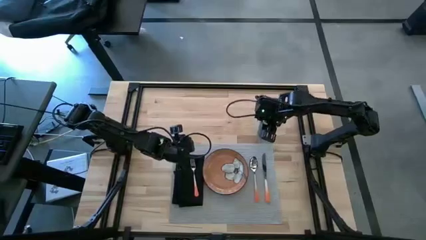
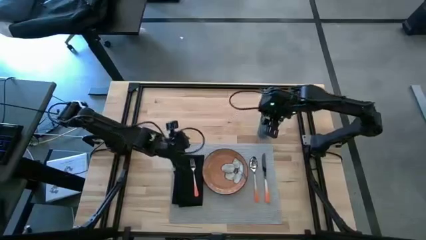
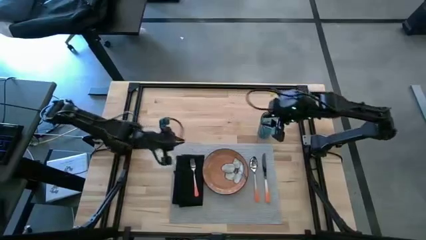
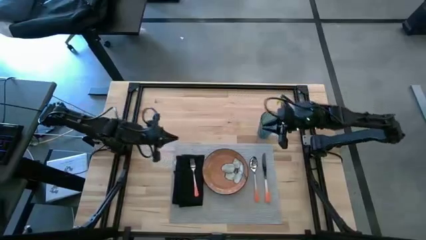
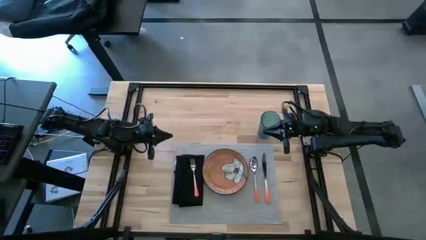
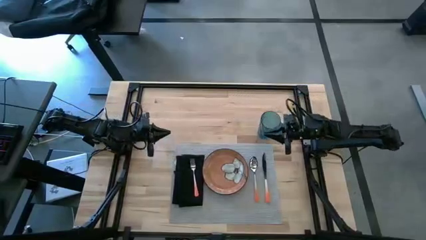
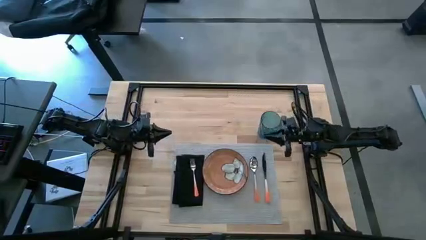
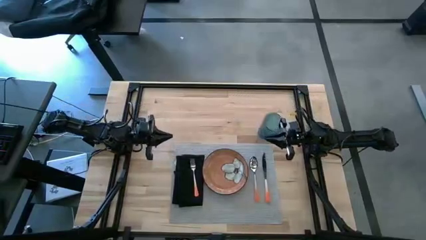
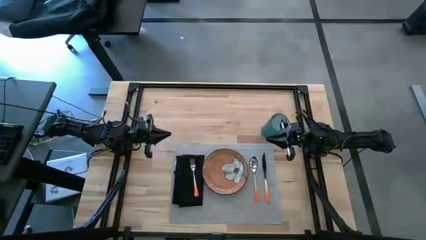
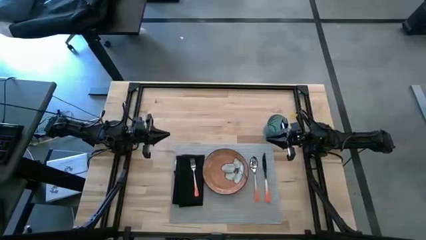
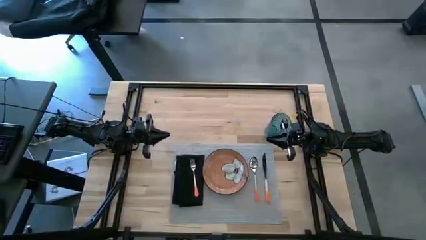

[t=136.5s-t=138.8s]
Task: Set table place
Return to Home Position

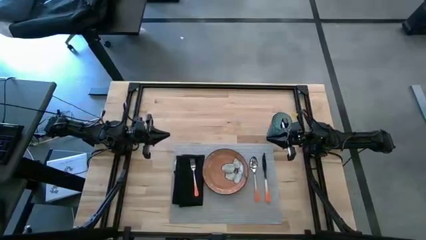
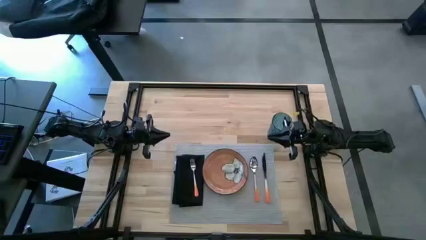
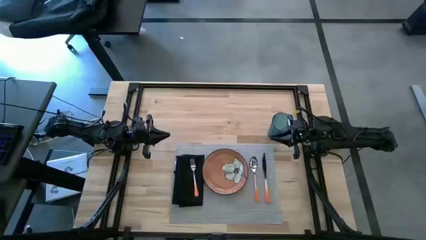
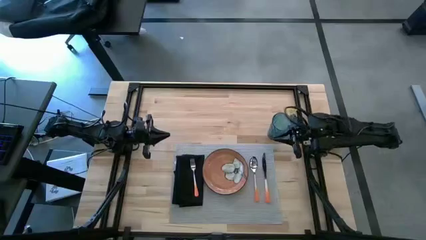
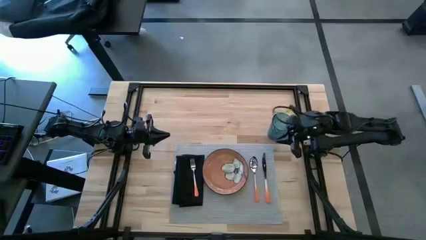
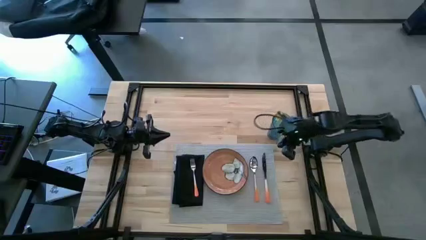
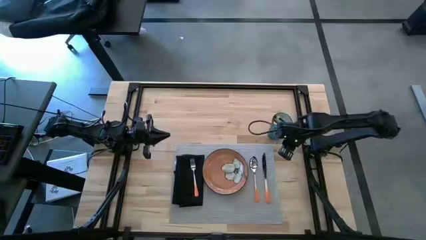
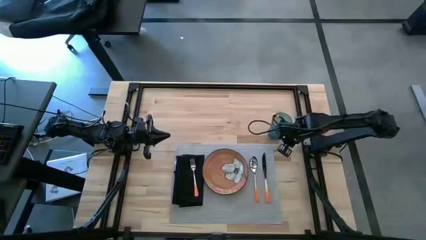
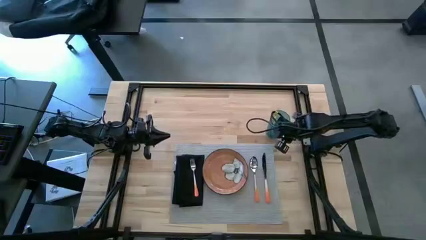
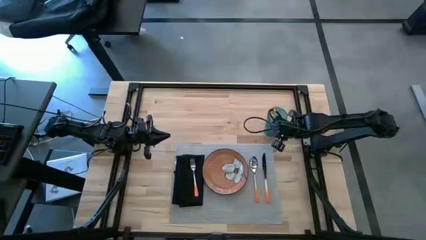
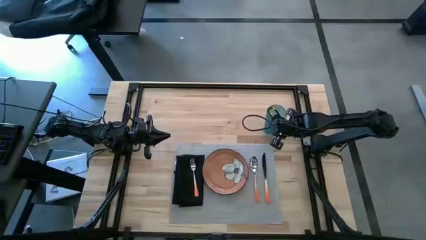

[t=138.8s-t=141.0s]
Adjust the blue cup

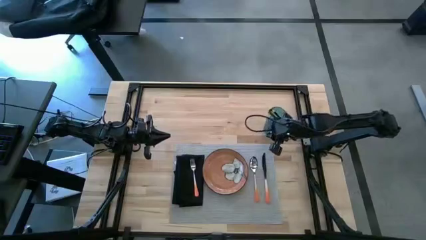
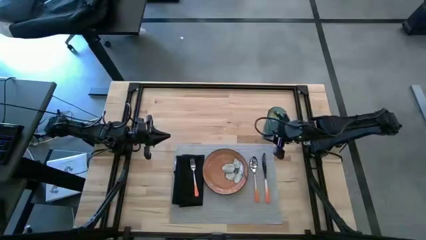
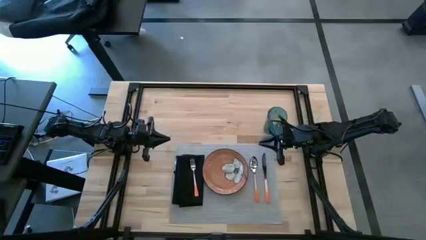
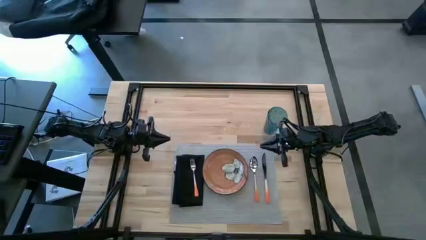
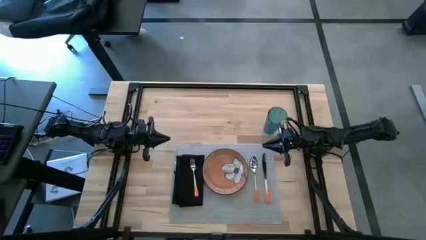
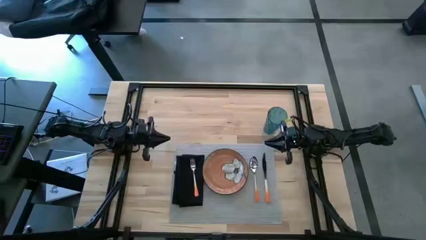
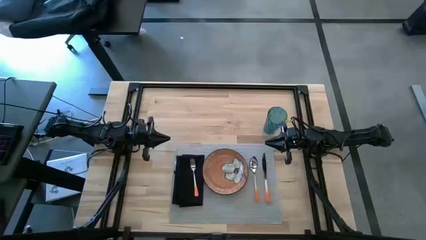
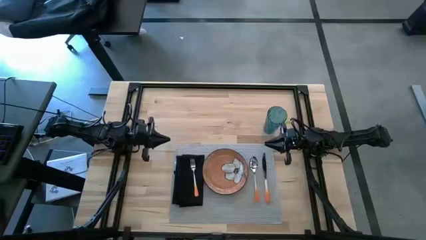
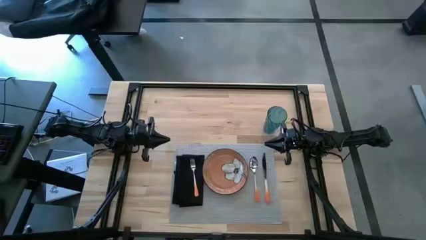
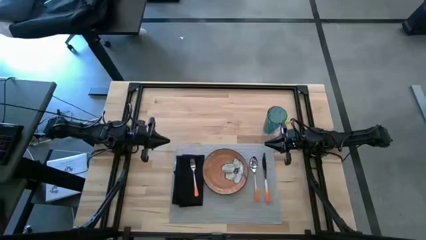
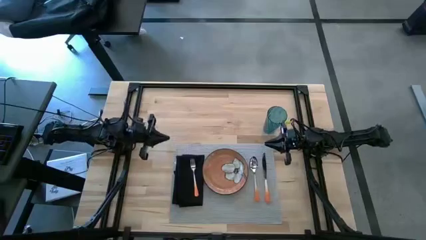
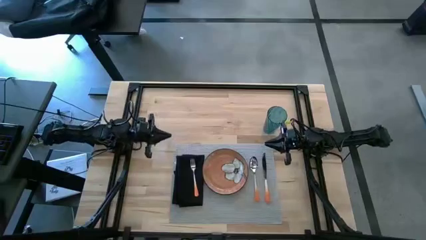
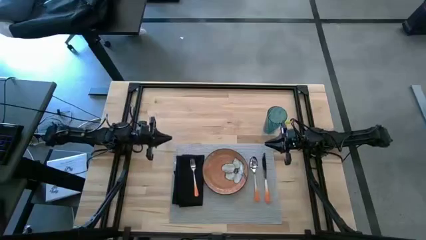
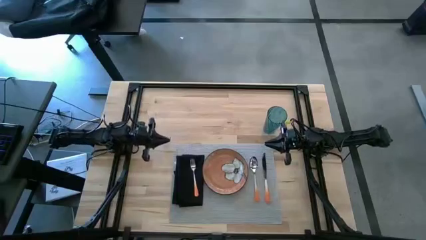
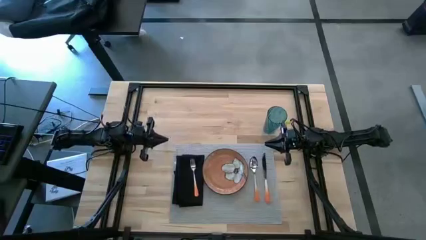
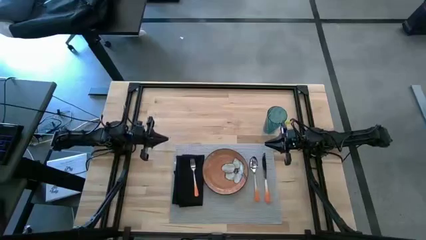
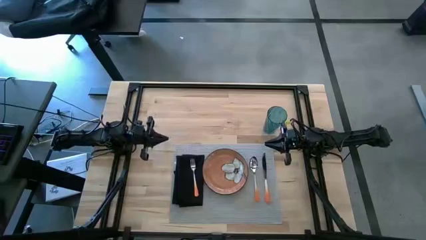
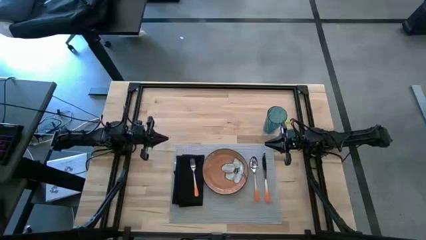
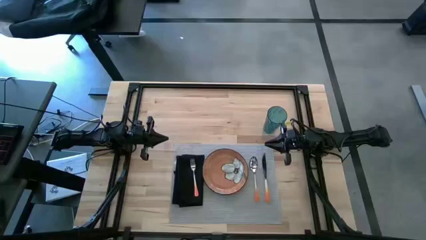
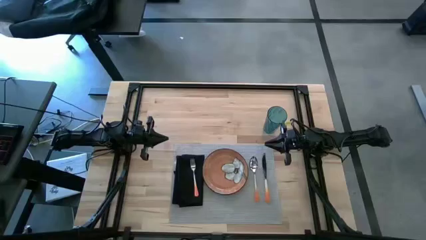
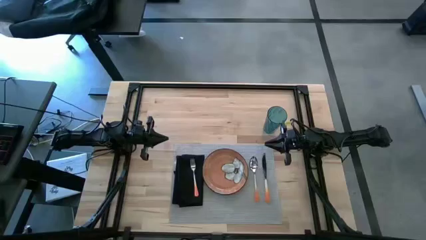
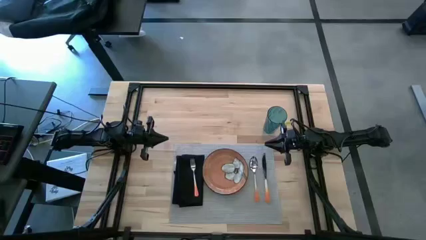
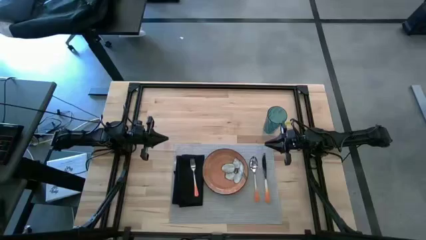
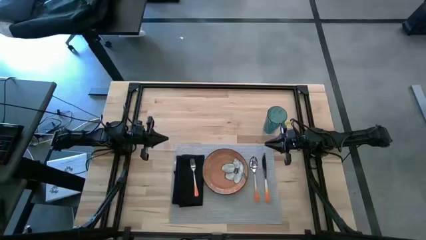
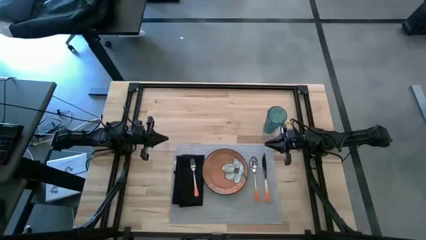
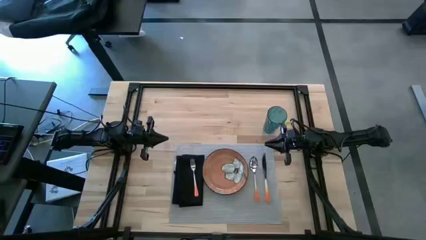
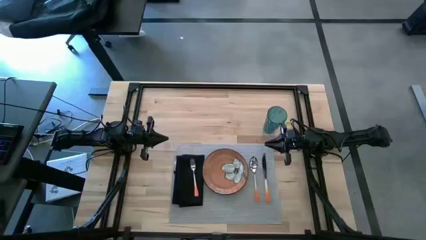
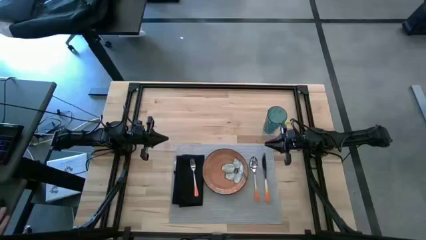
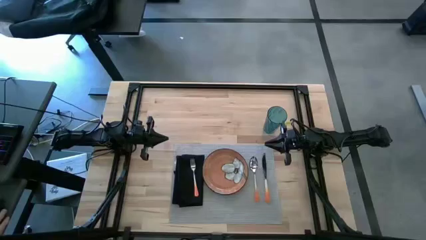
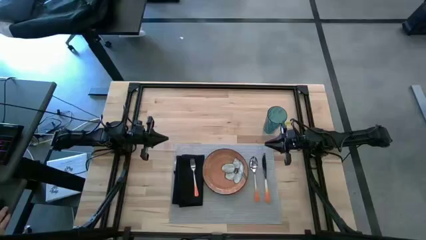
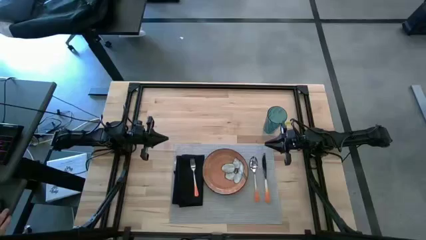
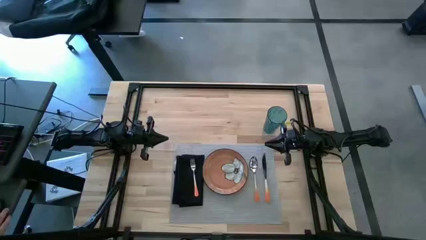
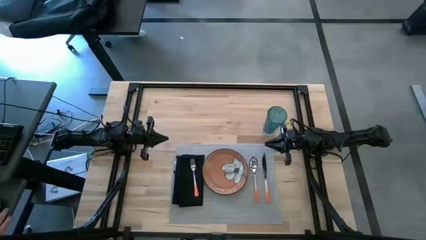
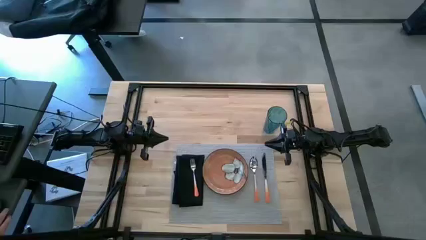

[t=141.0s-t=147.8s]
Return to Home Position

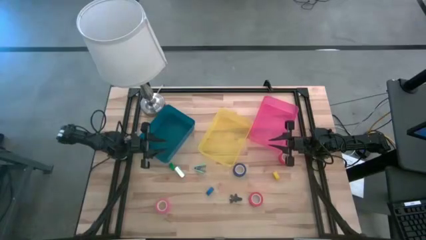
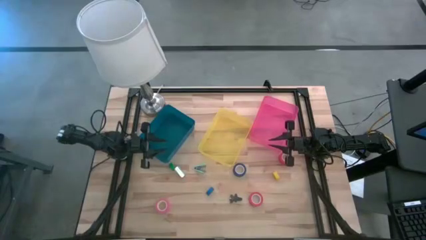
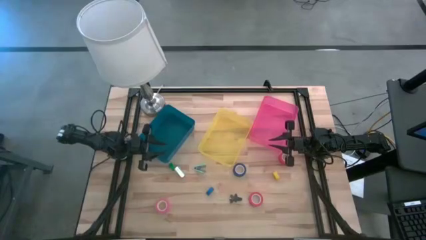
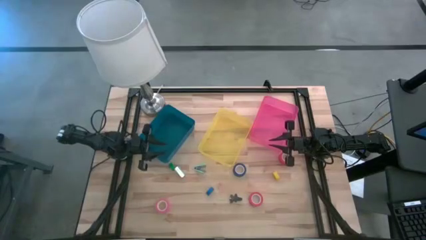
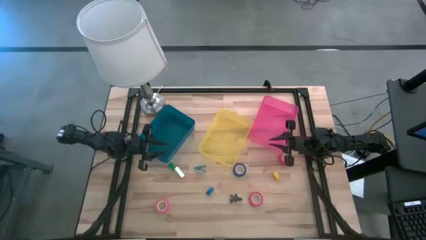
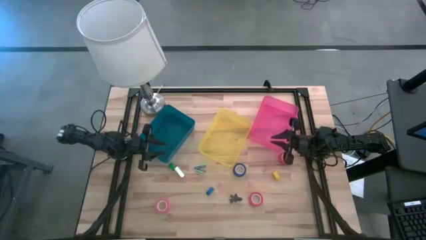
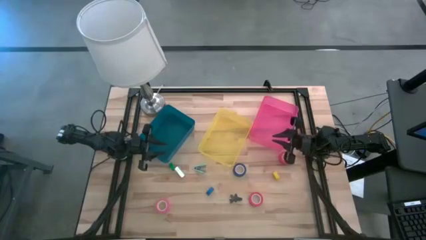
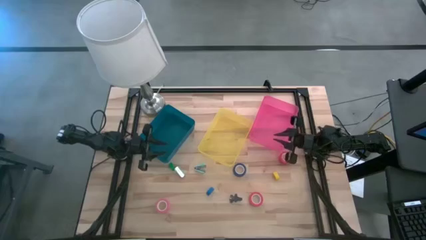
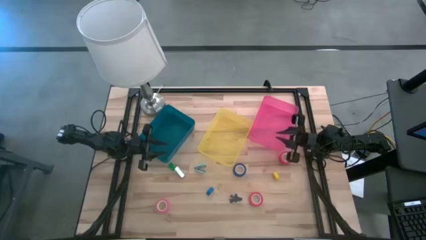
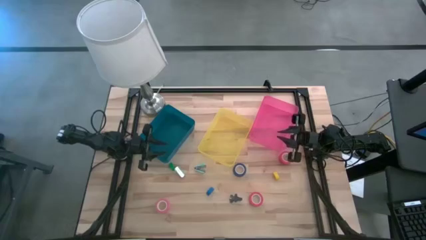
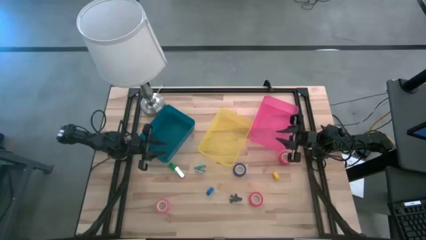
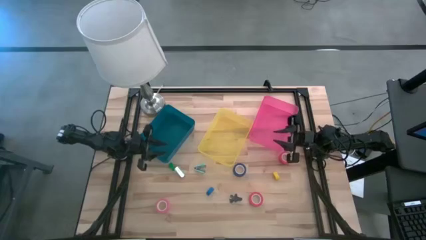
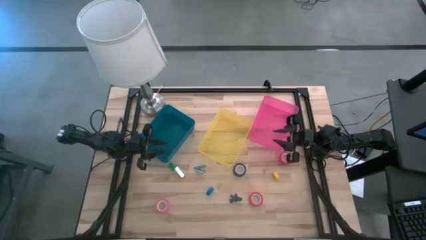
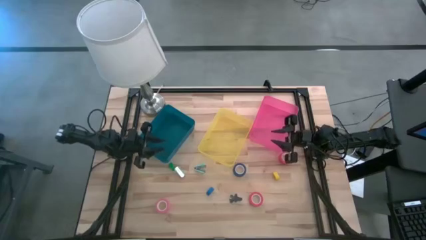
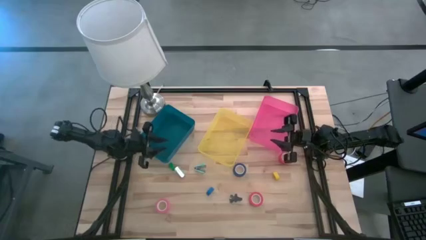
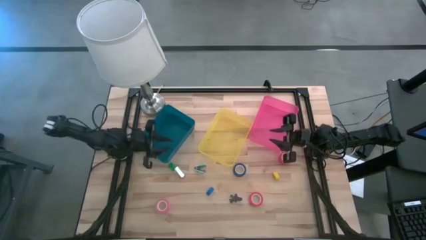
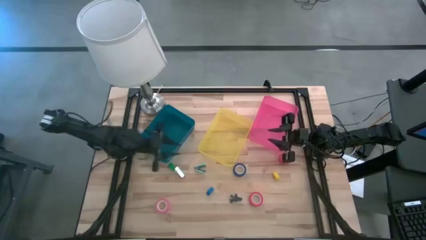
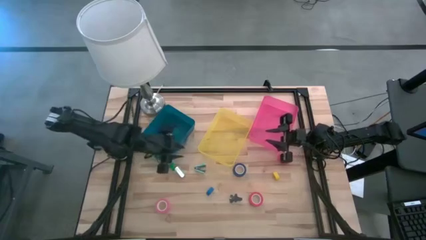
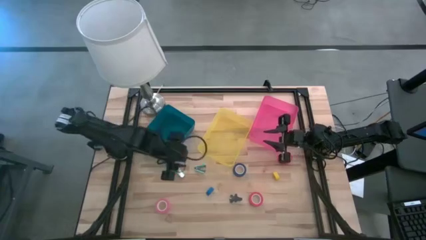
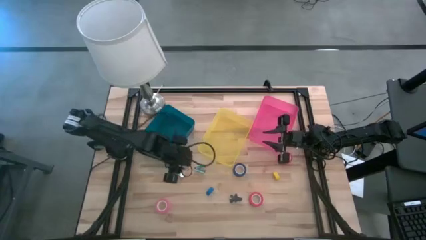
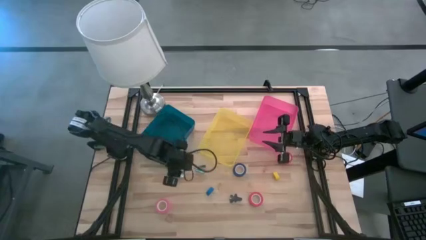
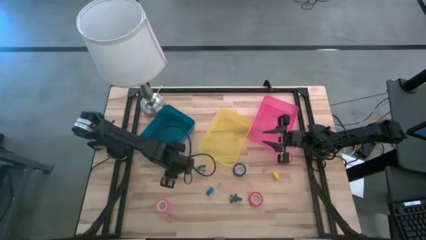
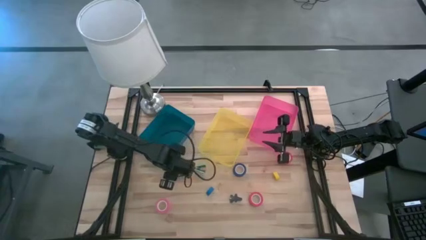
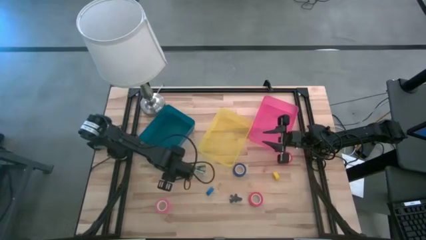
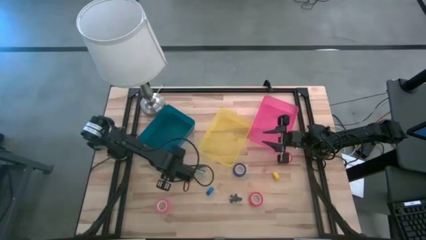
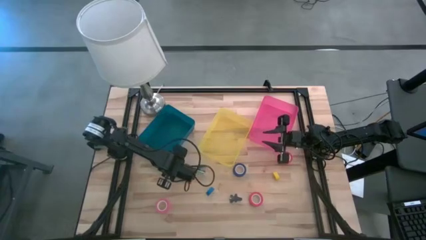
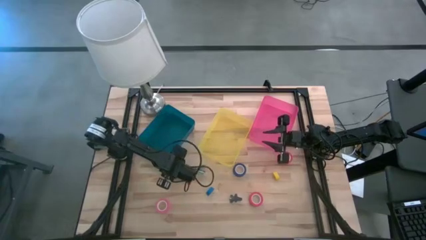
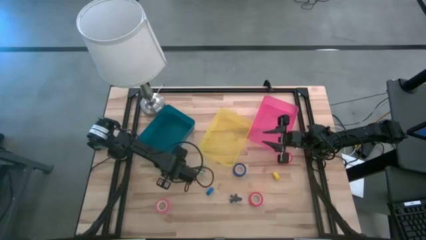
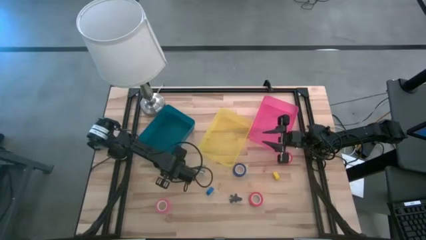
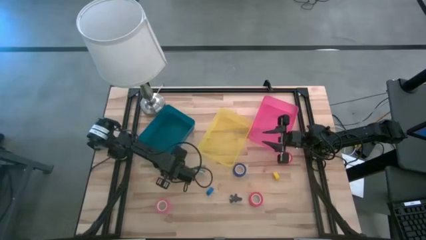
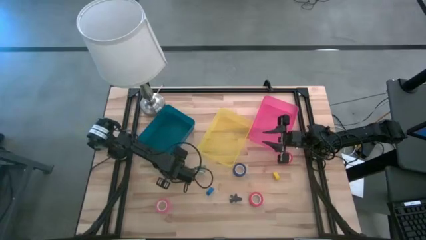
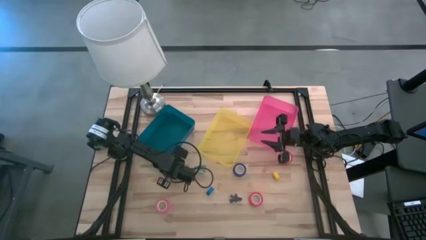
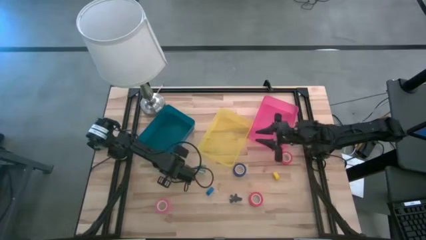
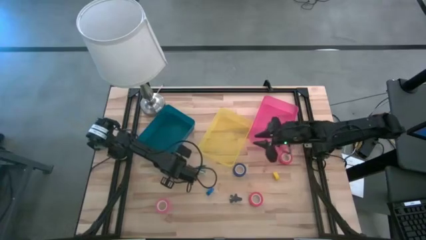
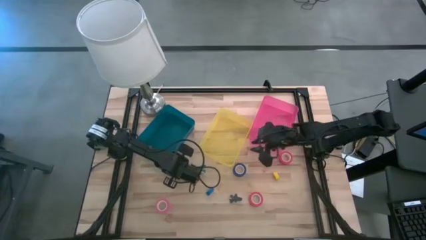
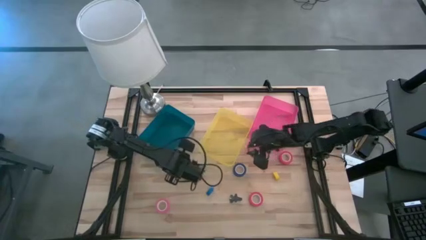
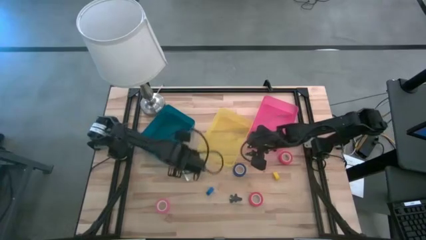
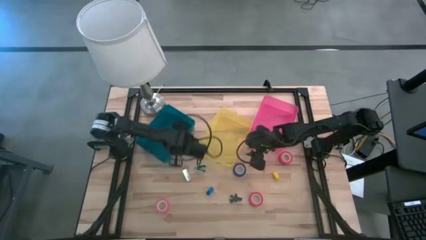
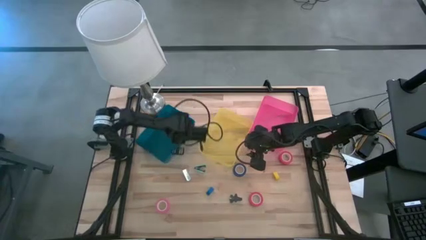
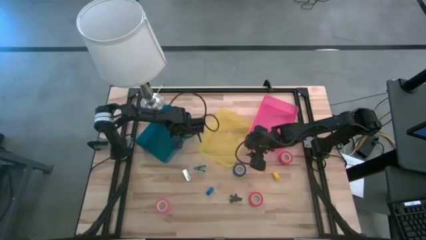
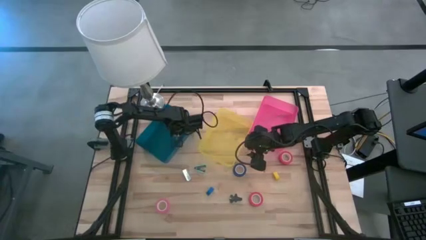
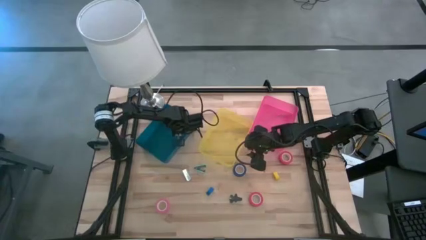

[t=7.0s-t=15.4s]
Task: Pick and place Stapler, Stapler remover, tape
Put the green stapler into the blue bin
